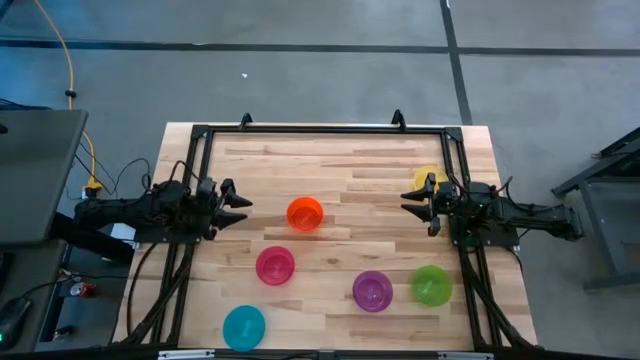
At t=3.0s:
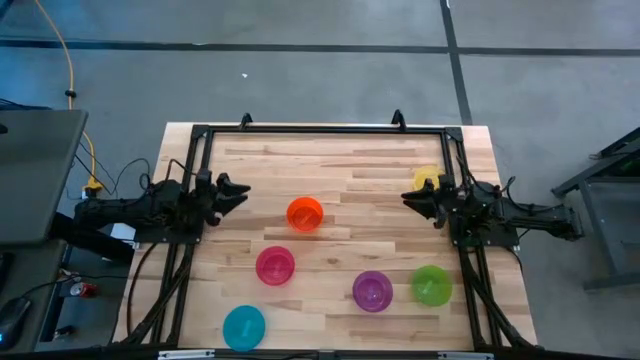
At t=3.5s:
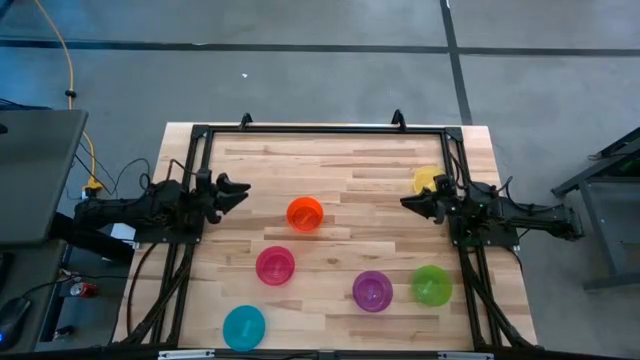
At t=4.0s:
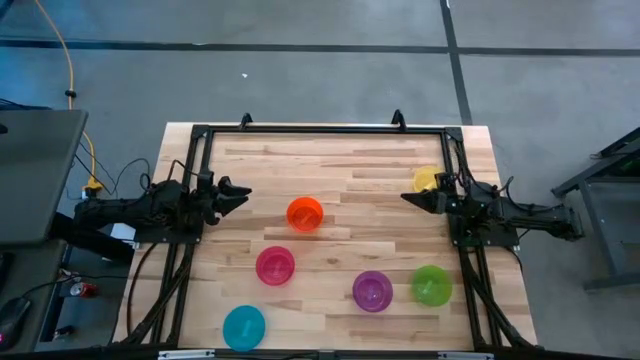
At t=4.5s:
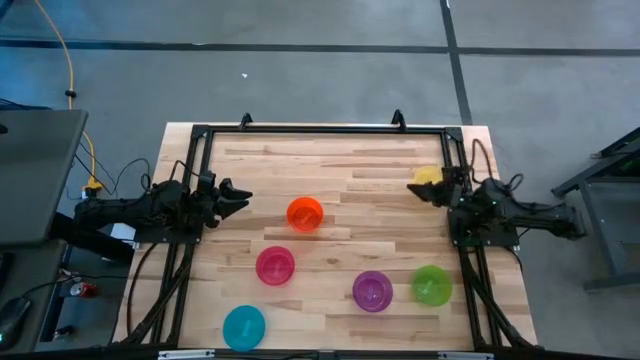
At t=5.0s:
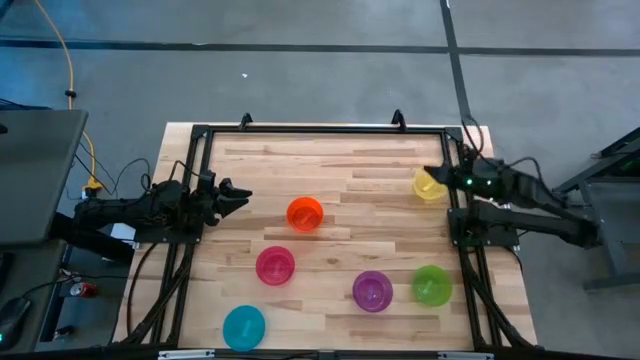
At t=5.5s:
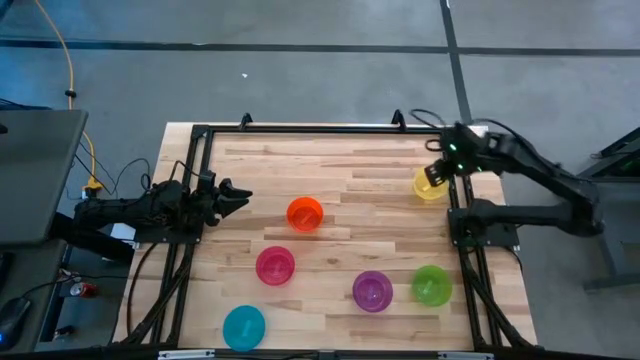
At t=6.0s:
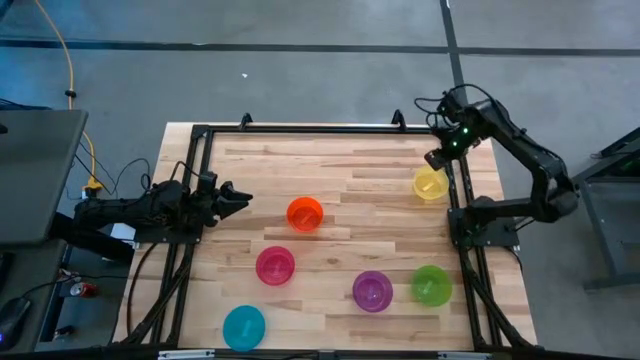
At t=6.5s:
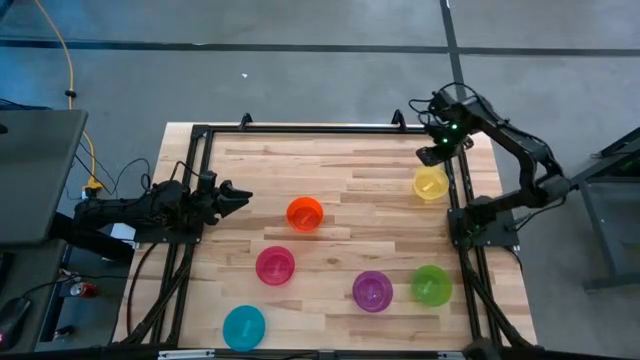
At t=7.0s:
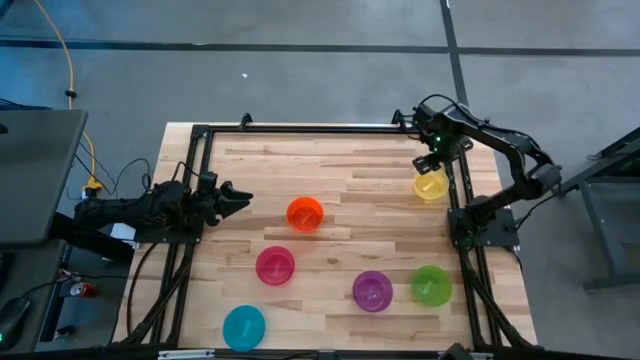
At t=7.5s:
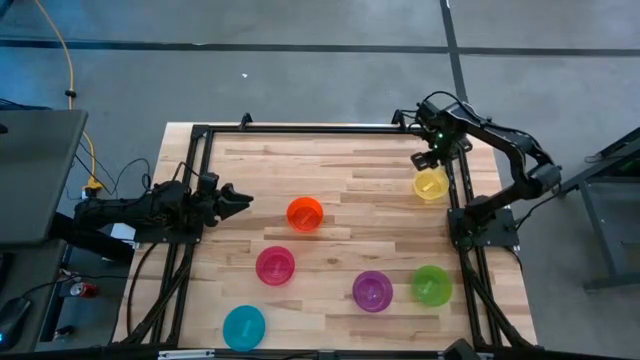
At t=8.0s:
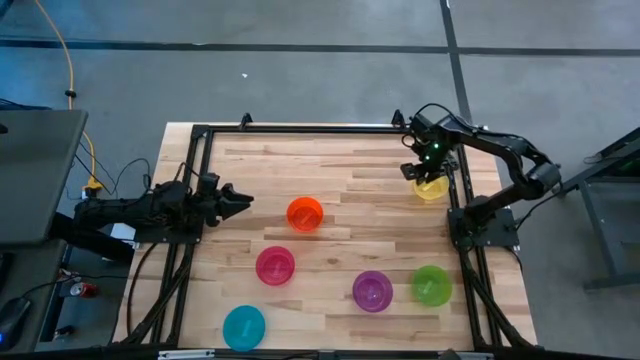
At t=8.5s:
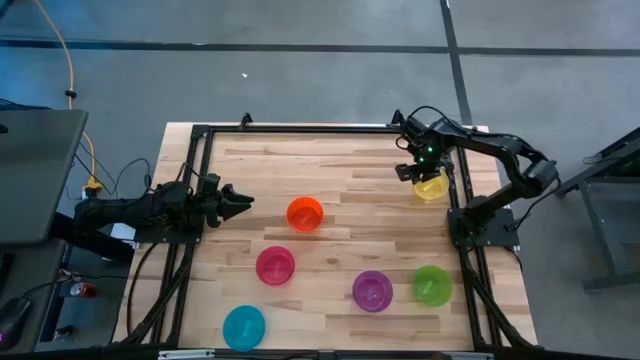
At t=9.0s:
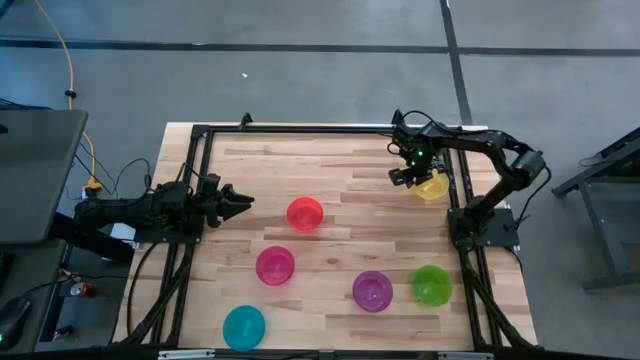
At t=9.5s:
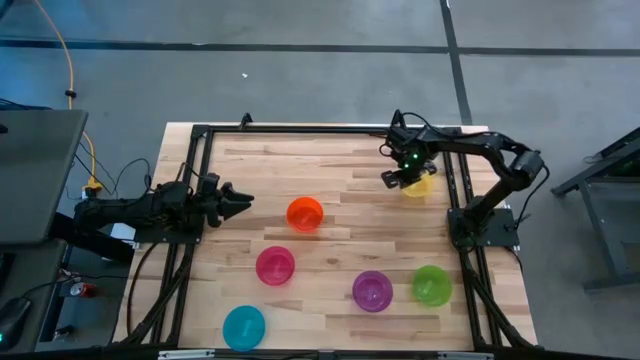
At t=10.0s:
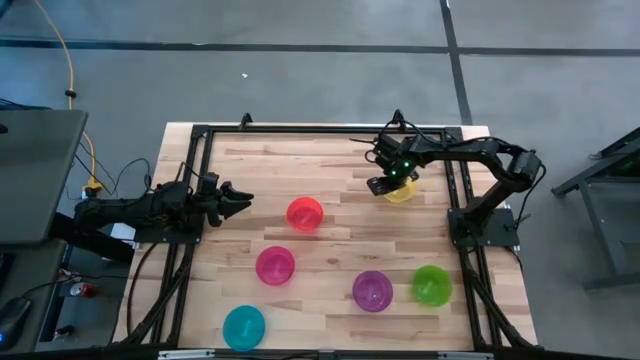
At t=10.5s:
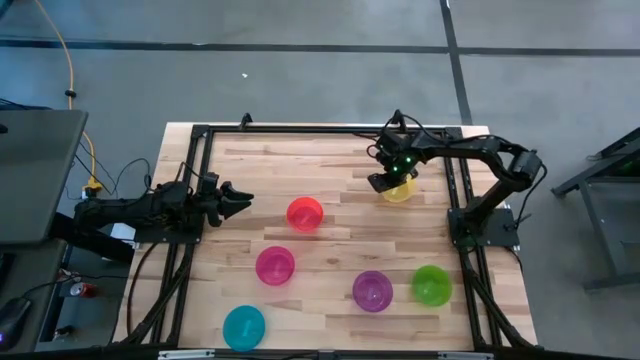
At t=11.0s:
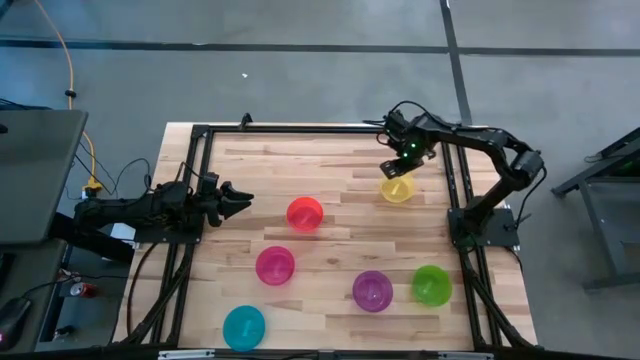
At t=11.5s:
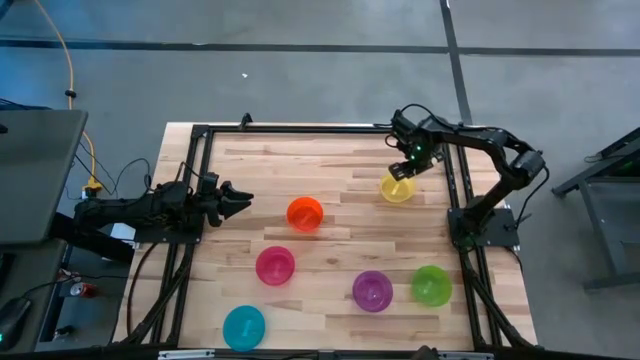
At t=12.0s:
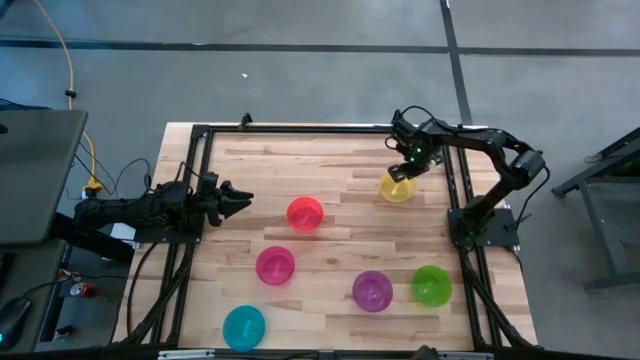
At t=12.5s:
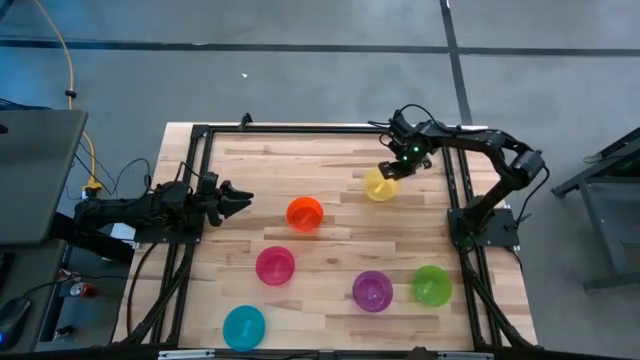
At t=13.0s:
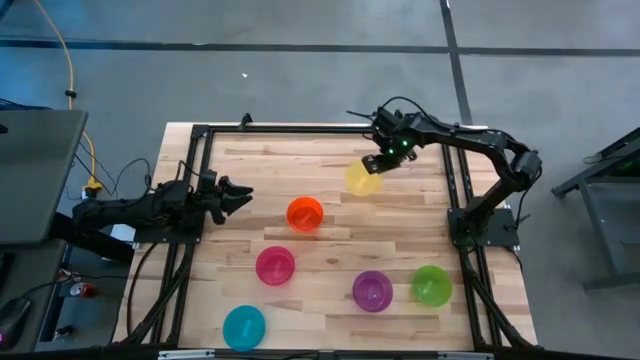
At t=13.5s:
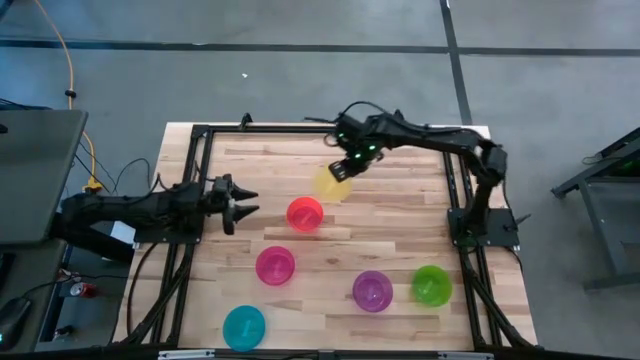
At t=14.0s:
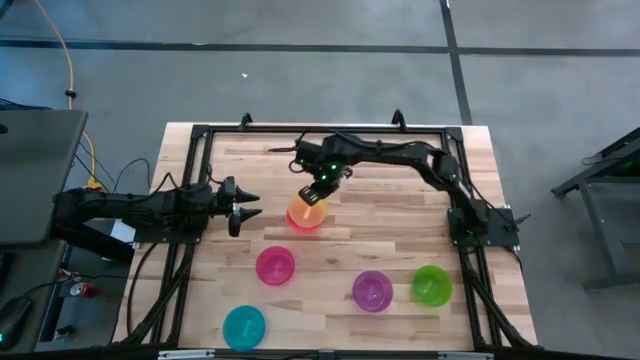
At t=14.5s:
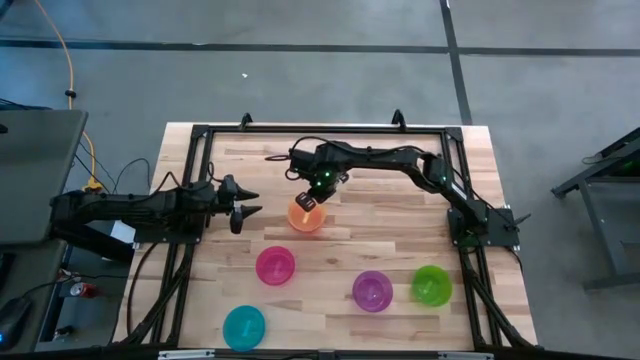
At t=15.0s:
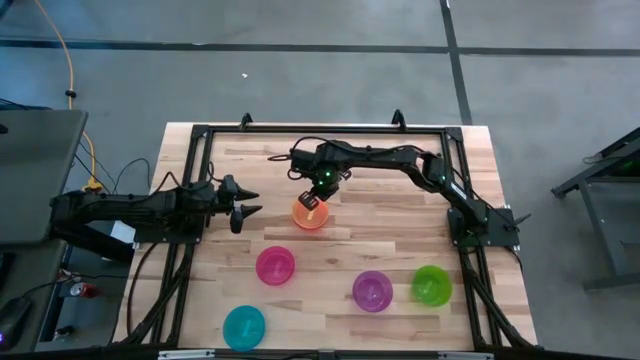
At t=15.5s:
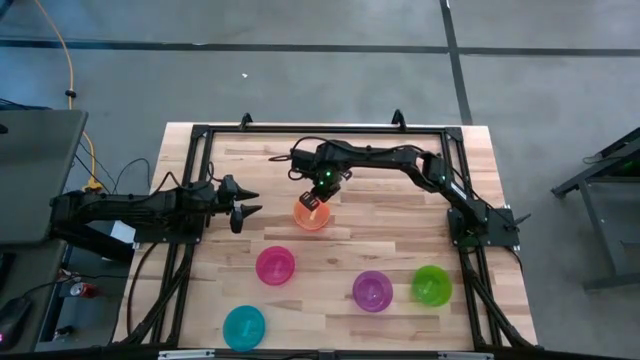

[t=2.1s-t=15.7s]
Task: Nest bowls inside each other
Stack the yellow bowl on top of the orange bowl

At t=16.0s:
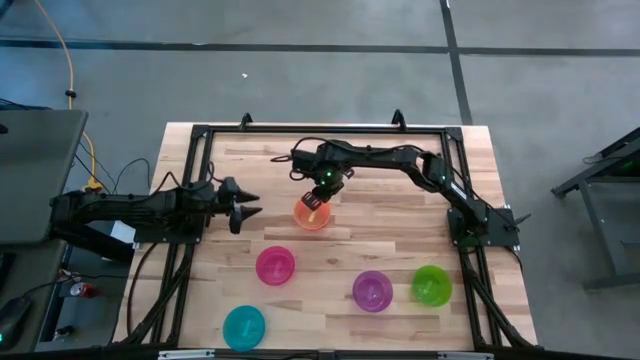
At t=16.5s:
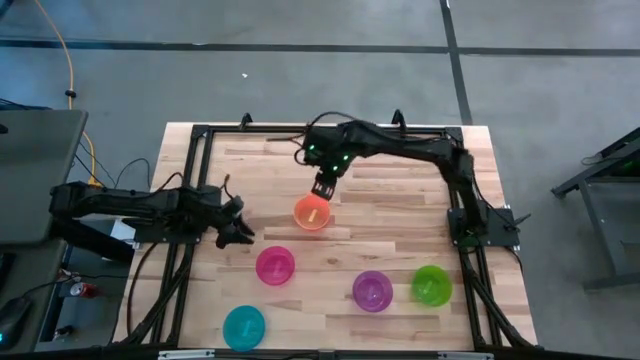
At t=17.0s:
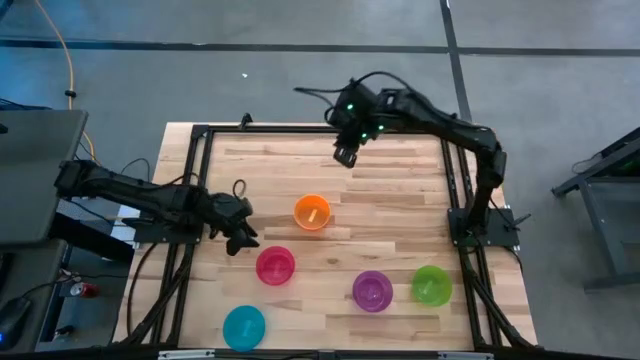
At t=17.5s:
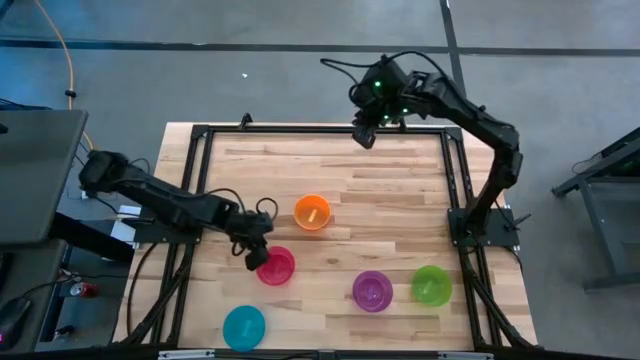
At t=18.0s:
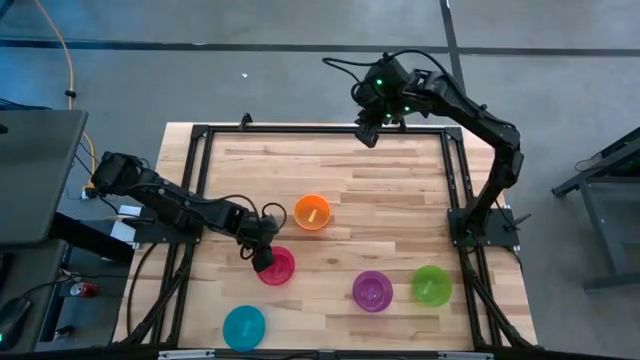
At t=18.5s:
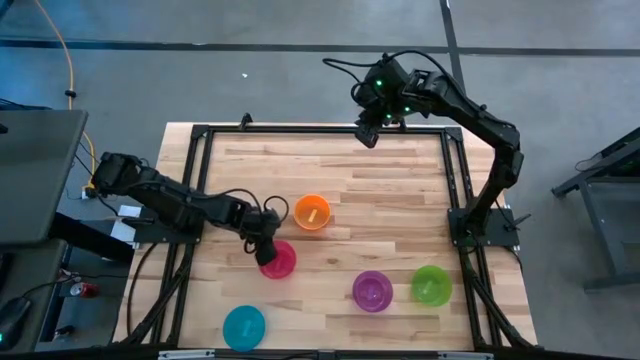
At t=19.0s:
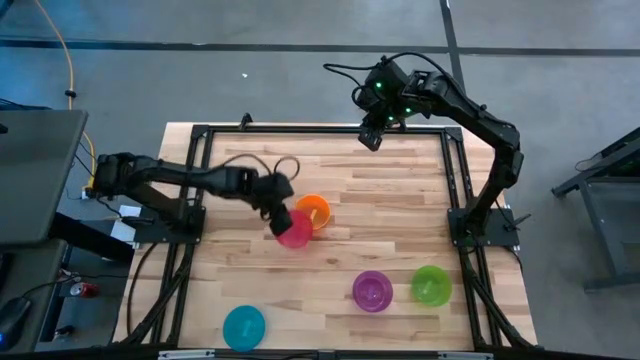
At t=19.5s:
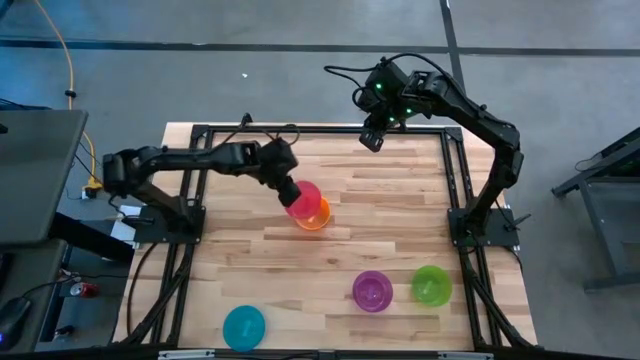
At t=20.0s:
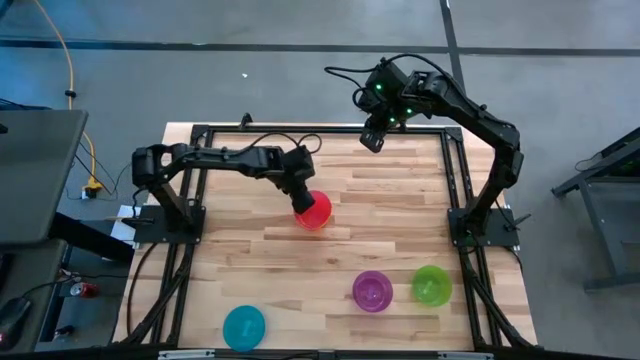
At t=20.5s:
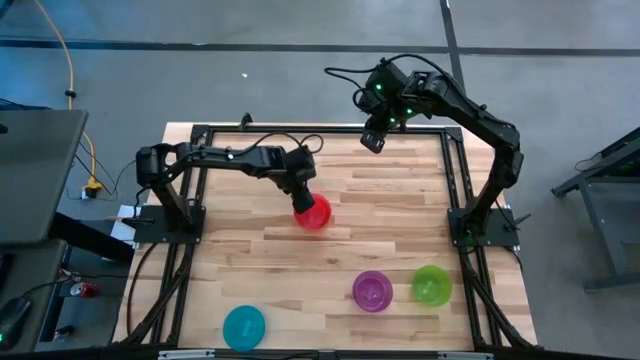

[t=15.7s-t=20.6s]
Stack the pink bowl on top of the yellow bowl
